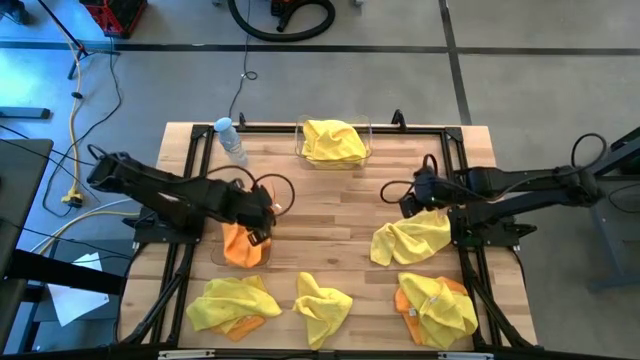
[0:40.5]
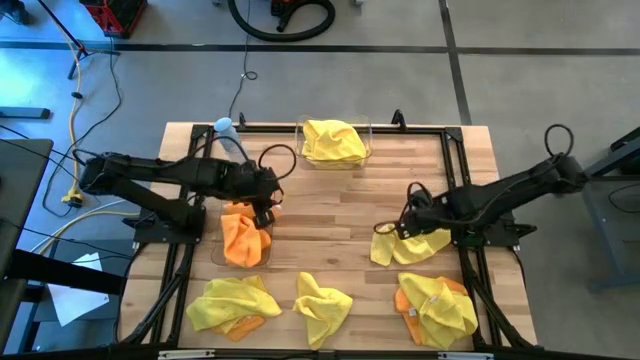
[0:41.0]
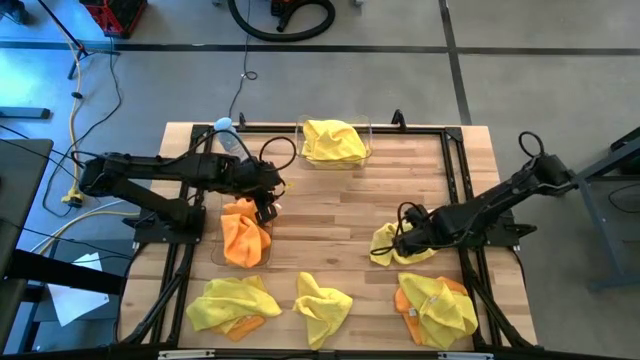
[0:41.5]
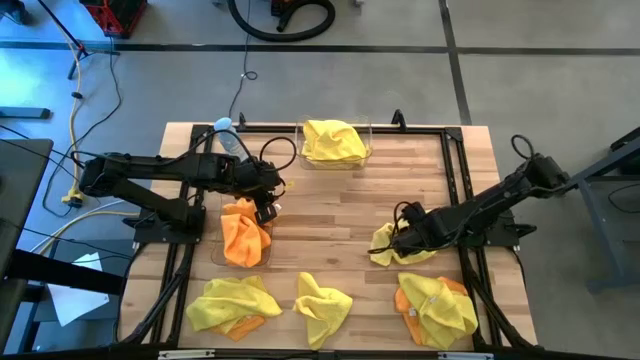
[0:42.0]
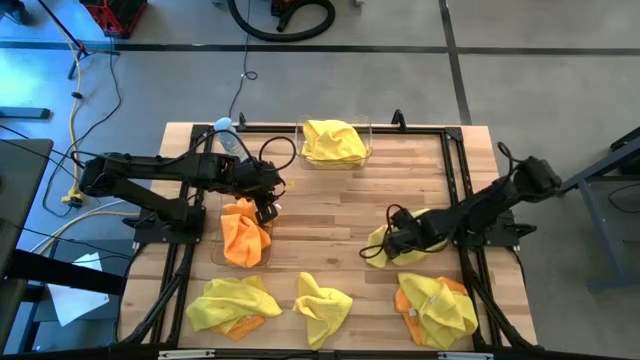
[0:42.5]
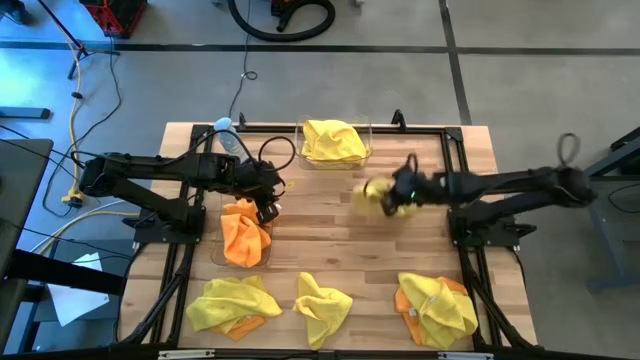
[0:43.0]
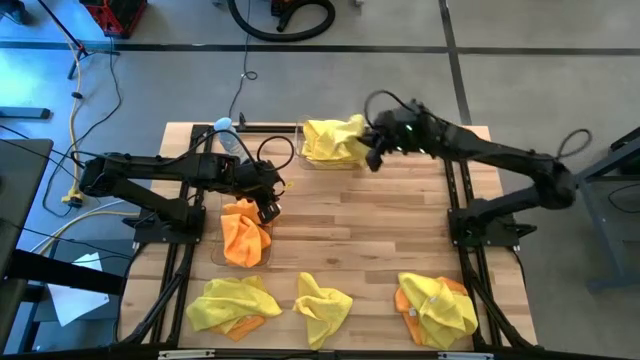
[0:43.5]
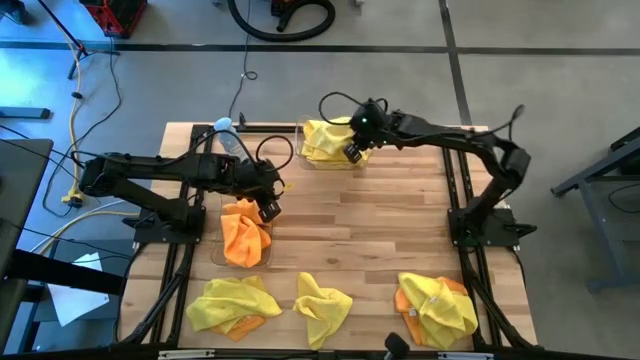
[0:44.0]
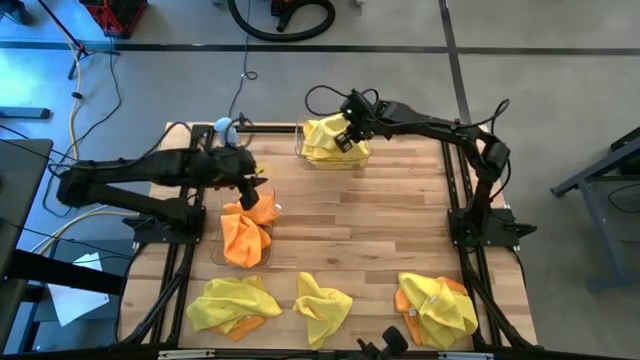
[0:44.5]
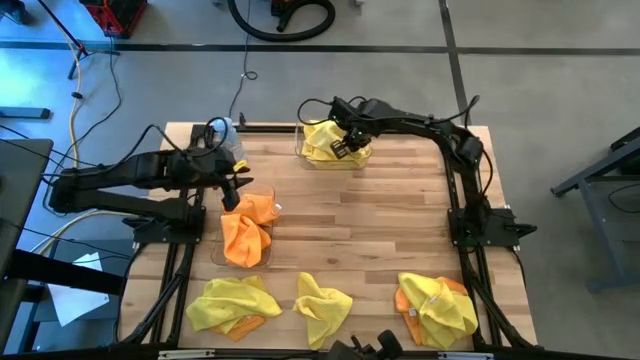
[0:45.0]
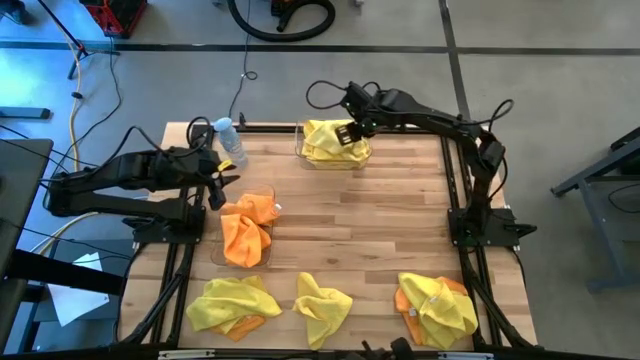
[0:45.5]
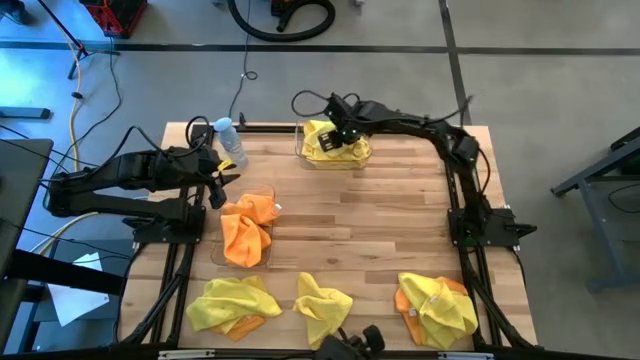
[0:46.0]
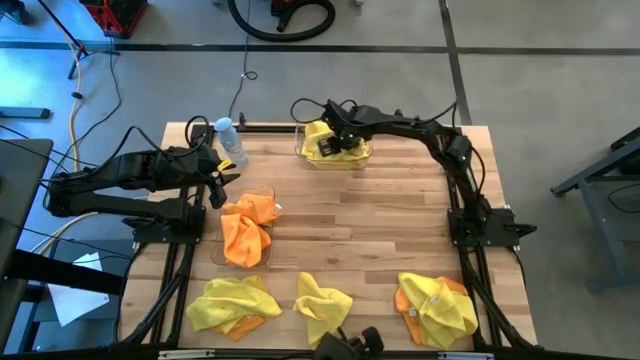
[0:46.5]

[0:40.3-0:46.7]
Task: Sort microfiber towel by color & place in baskets
Put the yellow microfiber towel into the top transparent bin

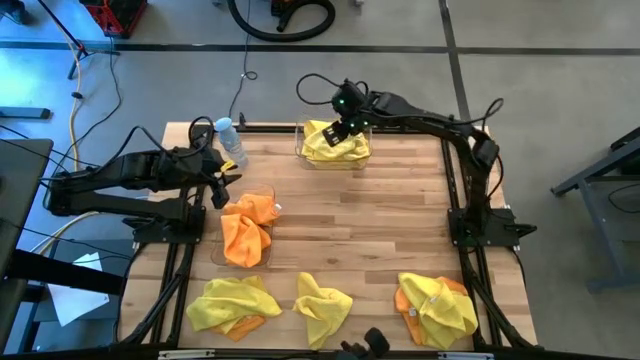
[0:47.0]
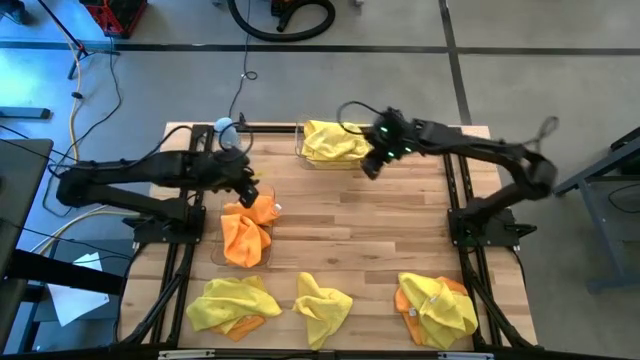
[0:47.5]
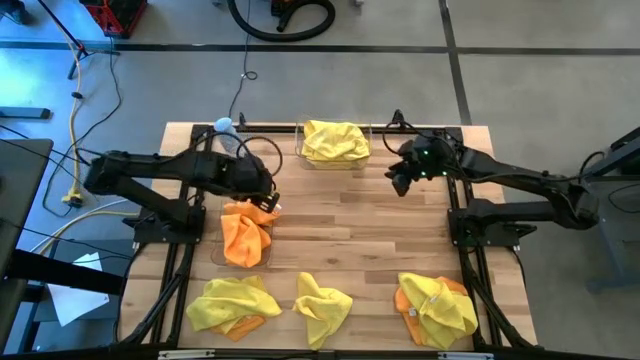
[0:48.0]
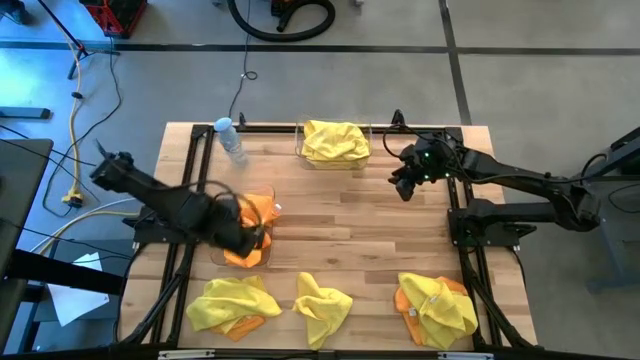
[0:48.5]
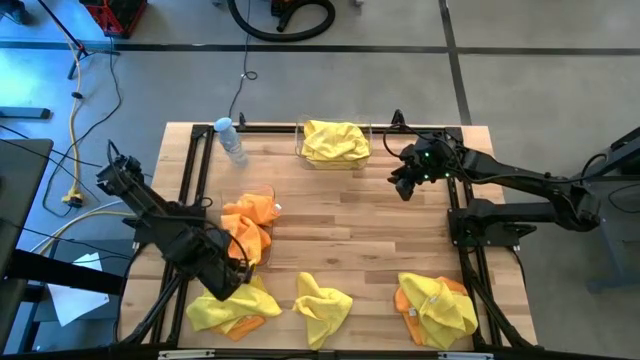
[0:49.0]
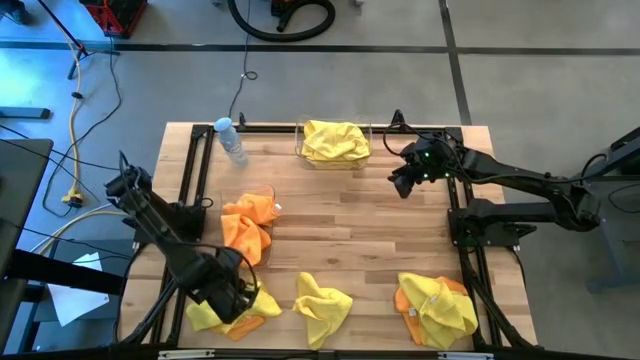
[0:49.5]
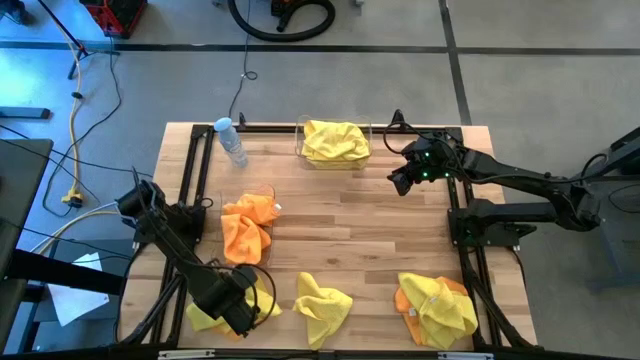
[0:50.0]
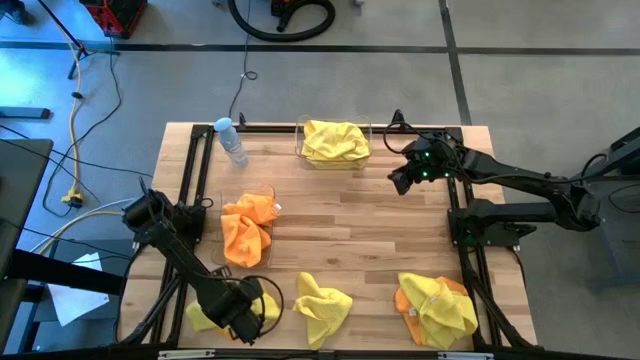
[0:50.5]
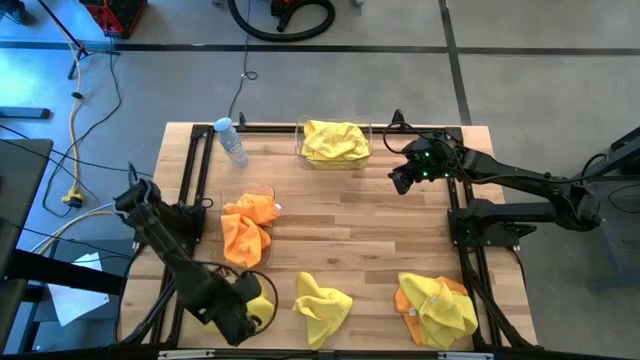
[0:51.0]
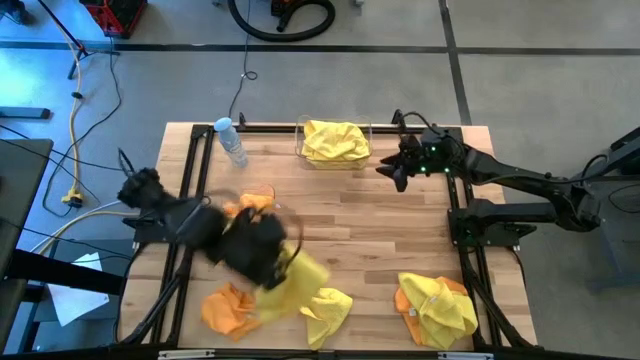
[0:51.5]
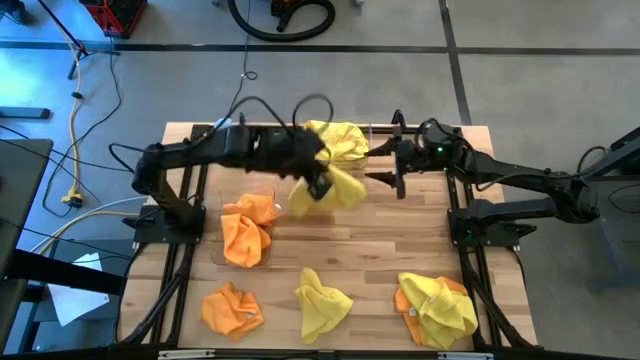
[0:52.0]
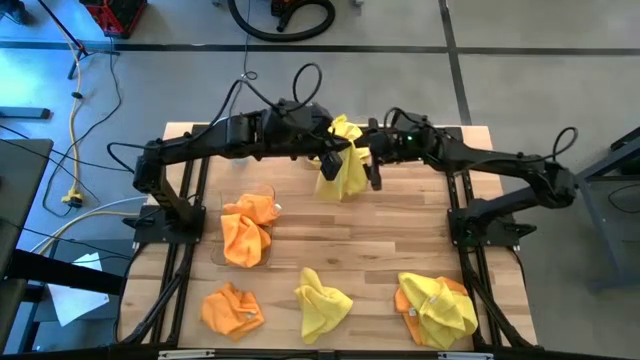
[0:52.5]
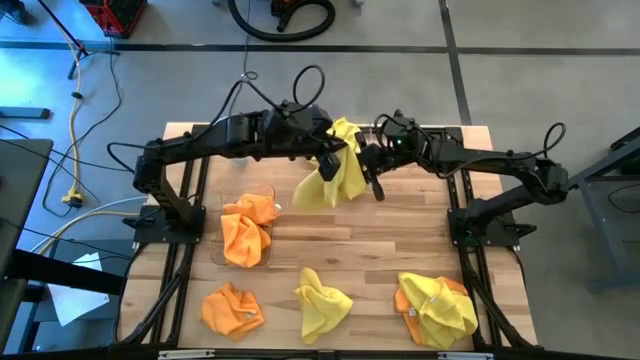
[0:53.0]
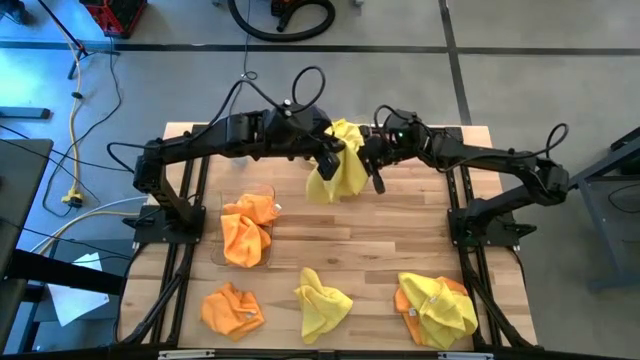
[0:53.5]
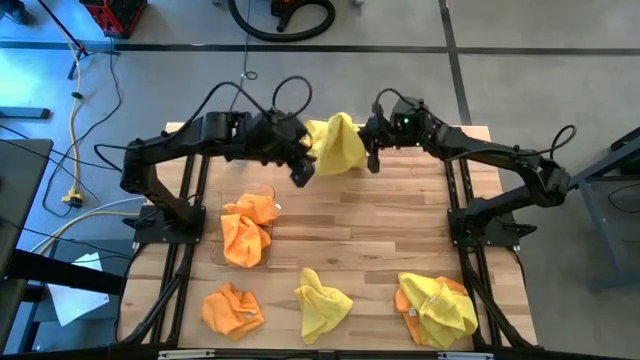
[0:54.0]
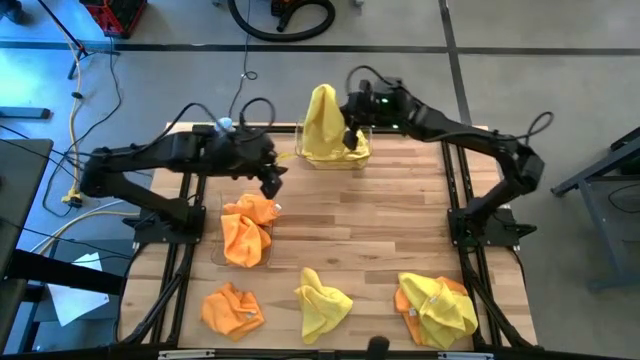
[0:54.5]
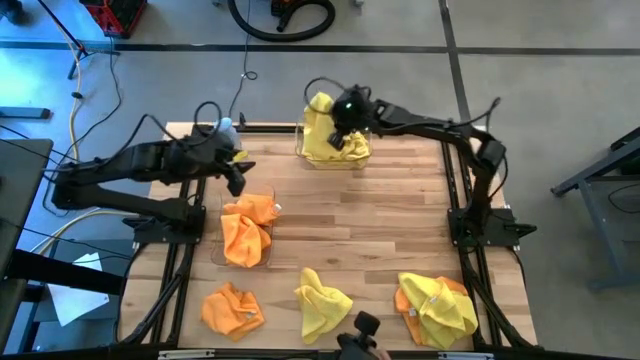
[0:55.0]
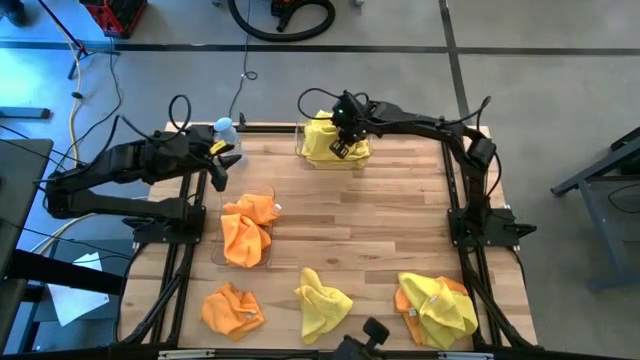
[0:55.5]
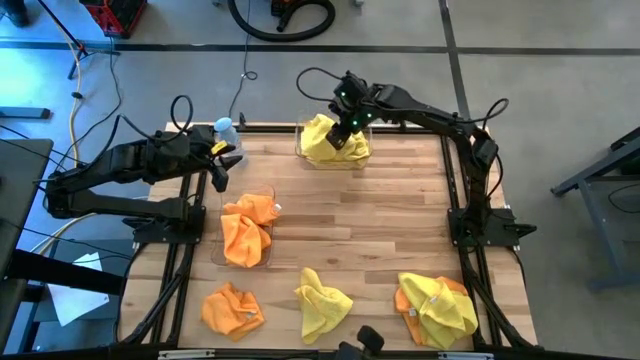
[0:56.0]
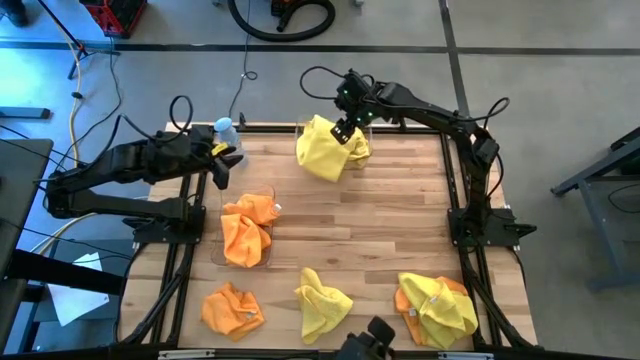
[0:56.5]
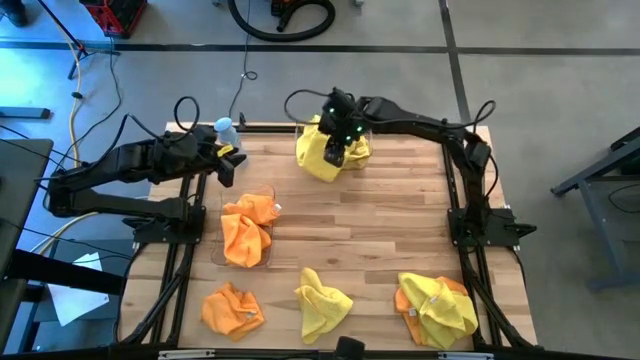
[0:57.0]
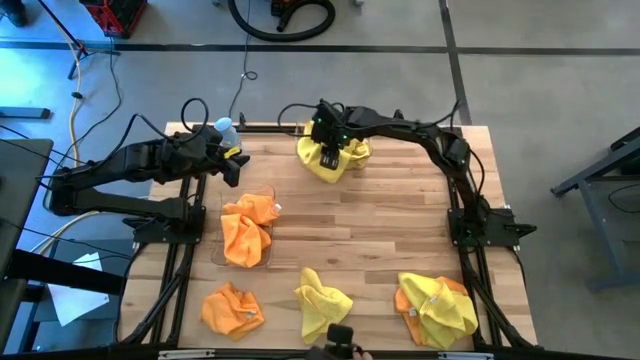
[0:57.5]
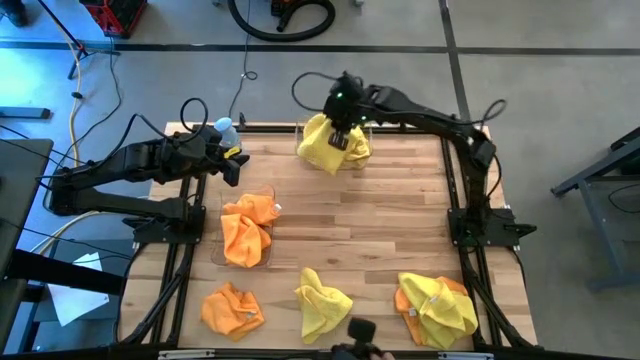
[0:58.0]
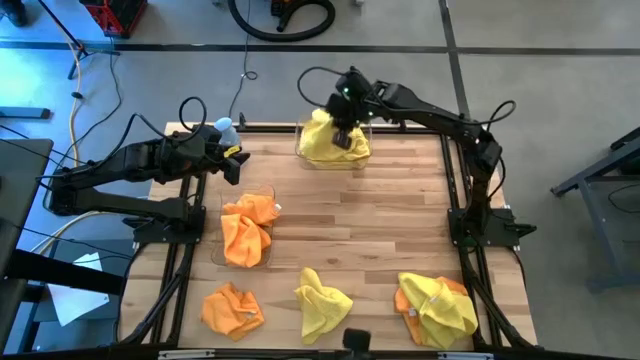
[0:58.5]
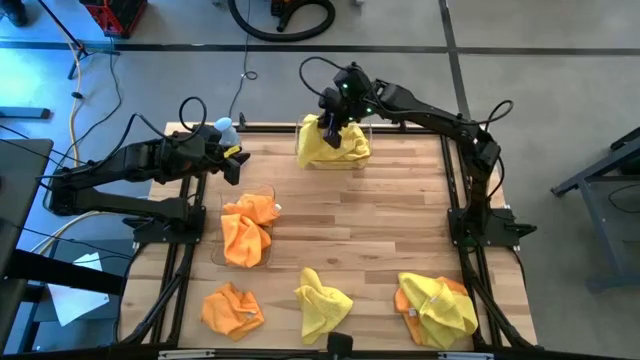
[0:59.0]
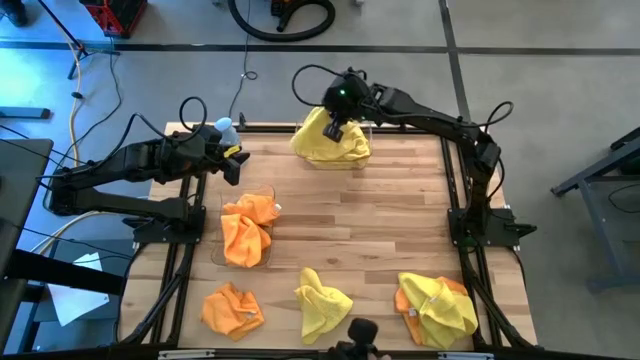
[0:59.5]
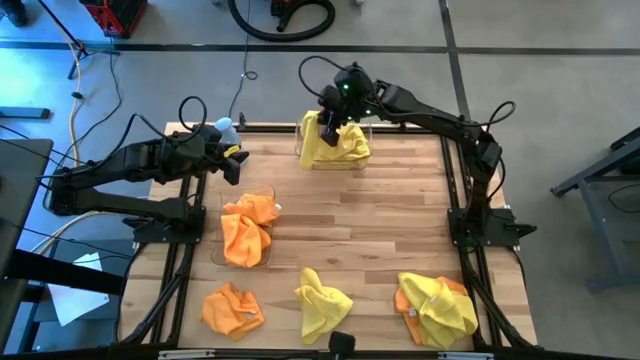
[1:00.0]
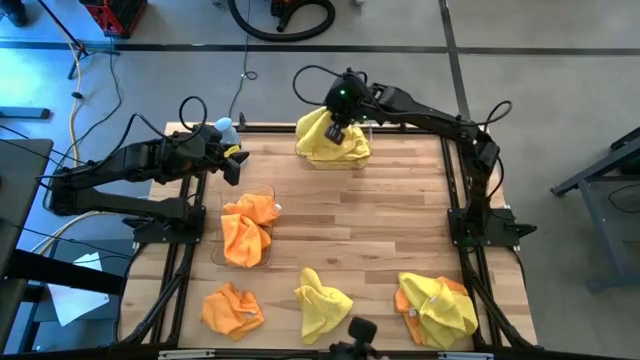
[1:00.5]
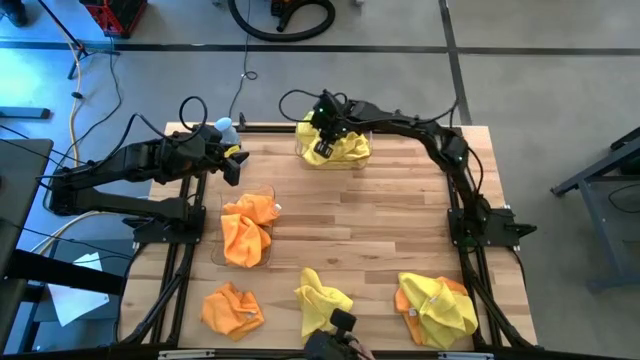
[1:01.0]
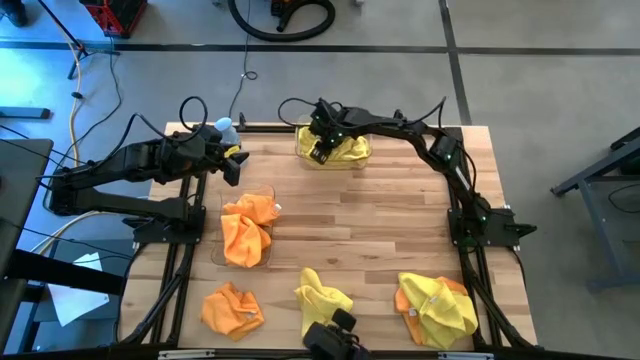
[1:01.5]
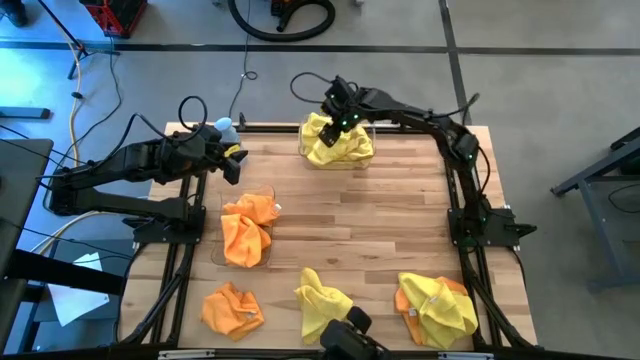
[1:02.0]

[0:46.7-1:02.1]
Put the yellow microfiber towel into the top transparent bin
